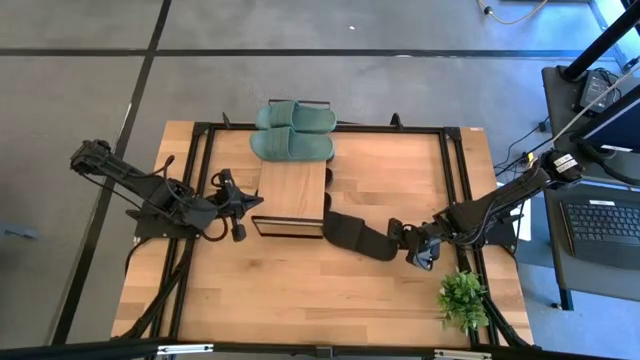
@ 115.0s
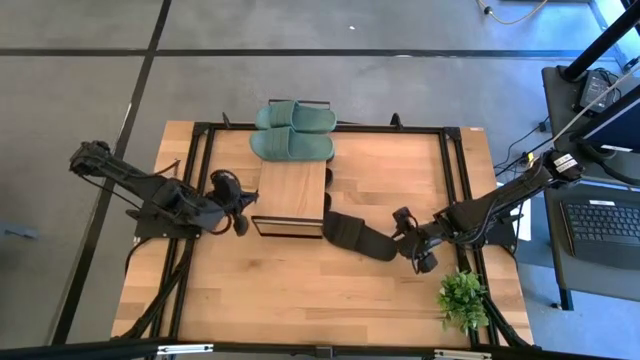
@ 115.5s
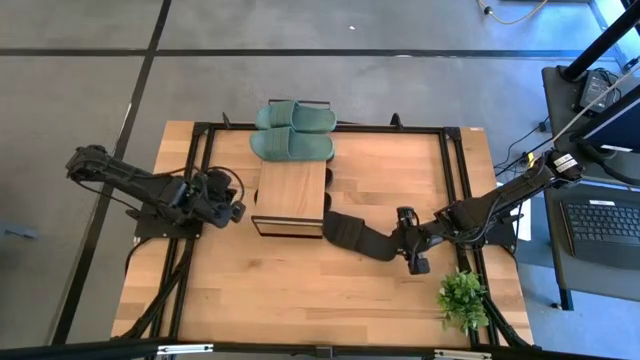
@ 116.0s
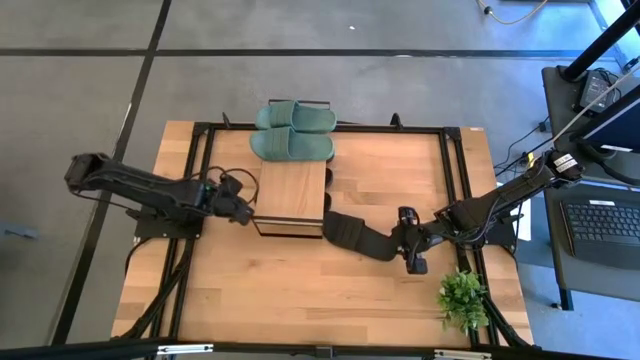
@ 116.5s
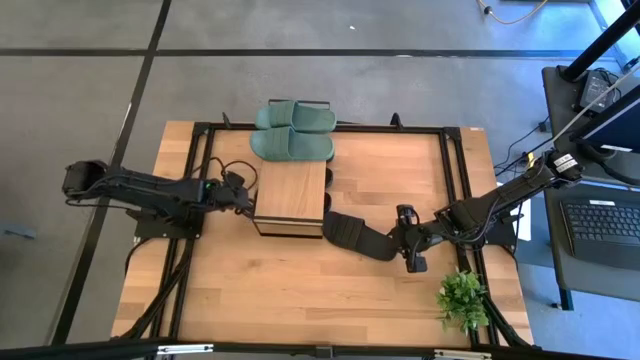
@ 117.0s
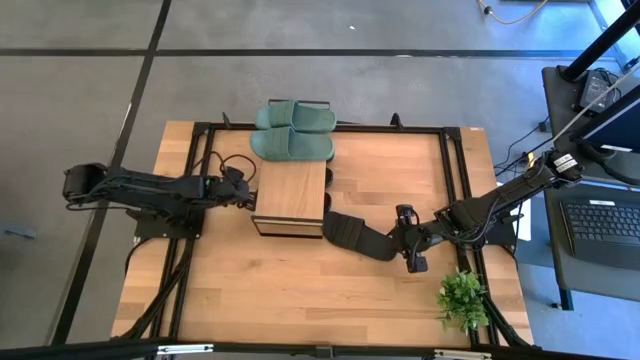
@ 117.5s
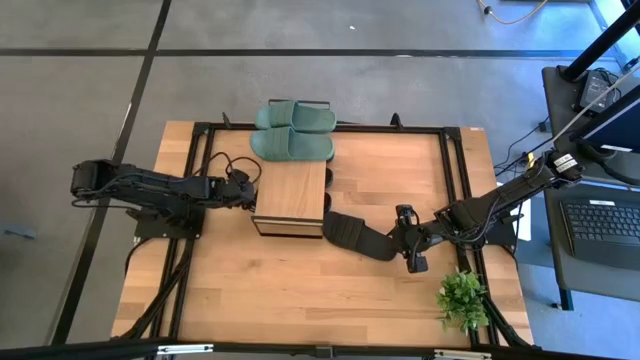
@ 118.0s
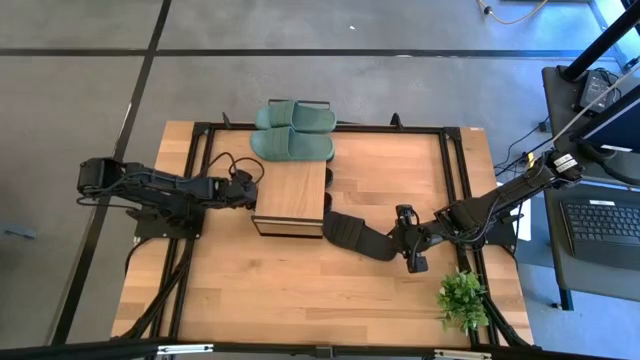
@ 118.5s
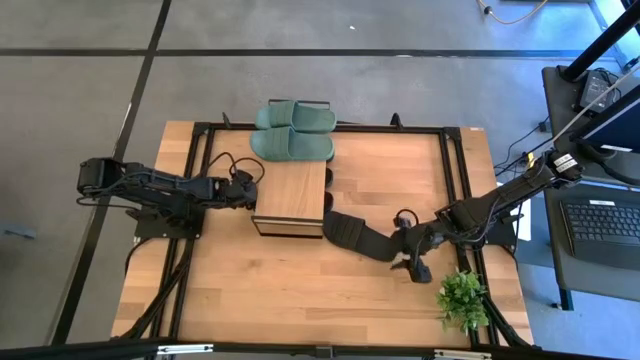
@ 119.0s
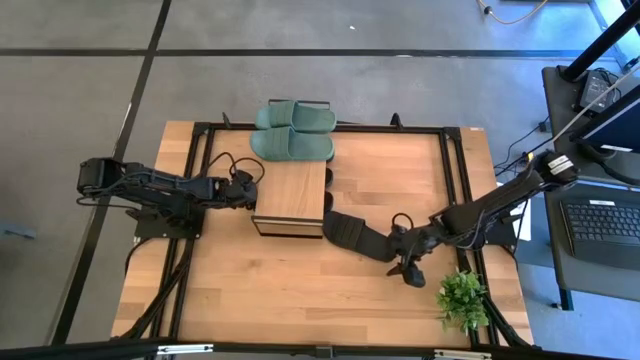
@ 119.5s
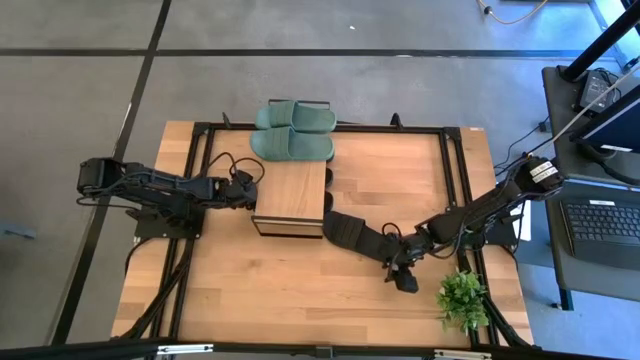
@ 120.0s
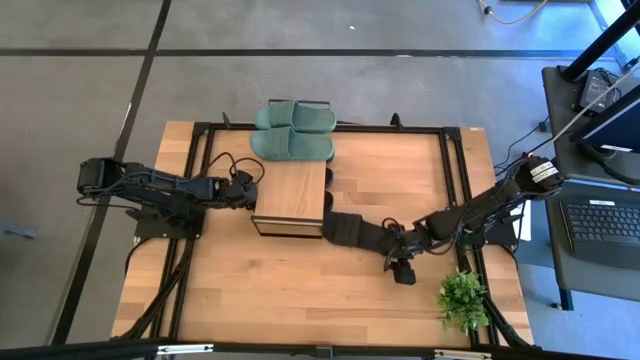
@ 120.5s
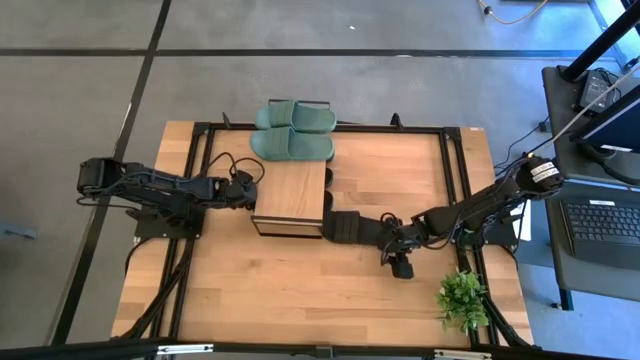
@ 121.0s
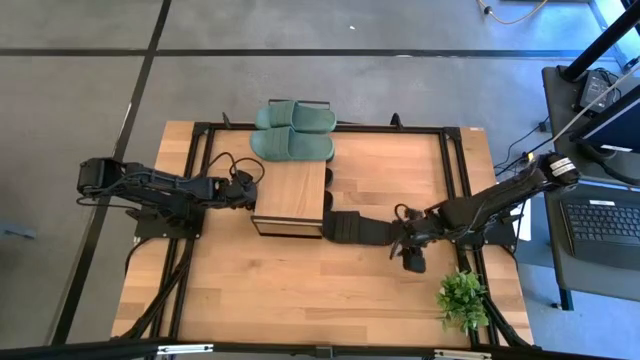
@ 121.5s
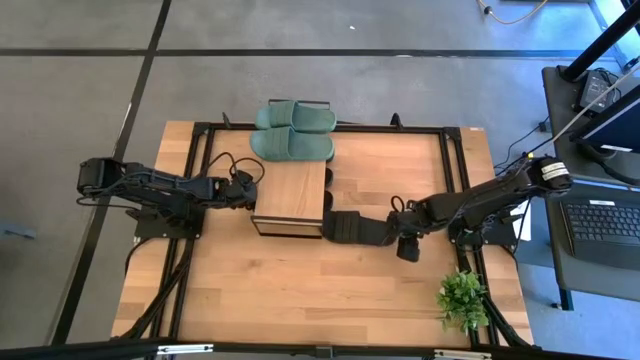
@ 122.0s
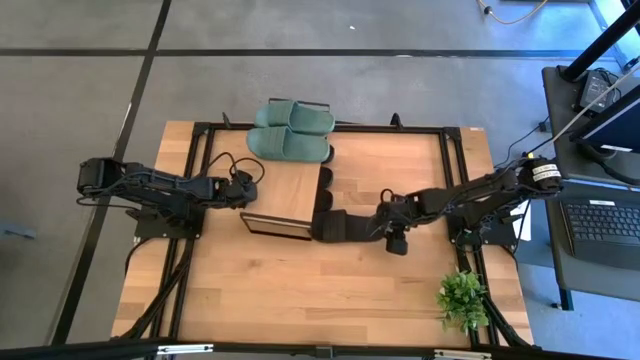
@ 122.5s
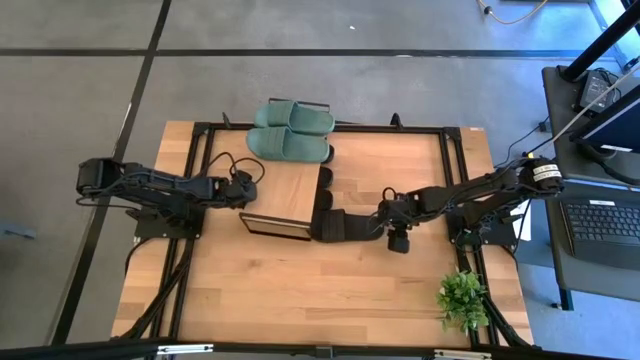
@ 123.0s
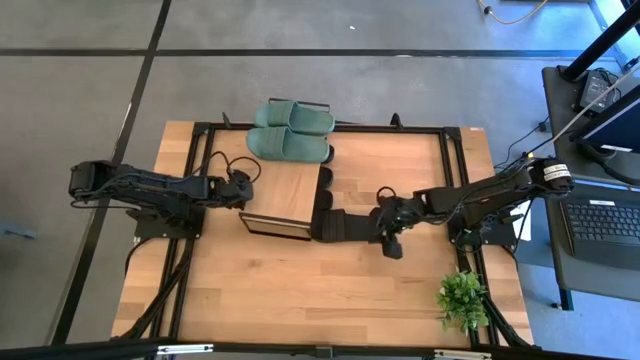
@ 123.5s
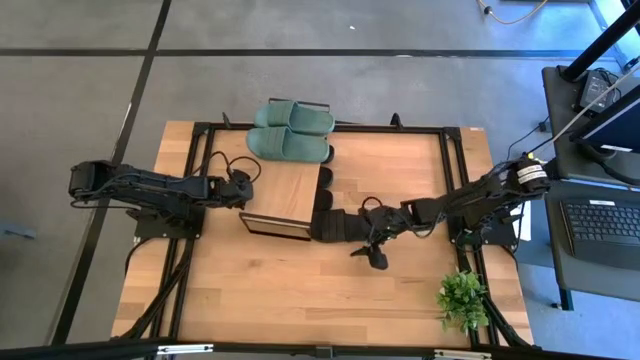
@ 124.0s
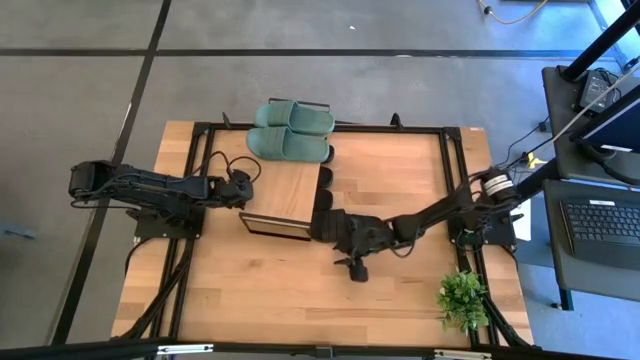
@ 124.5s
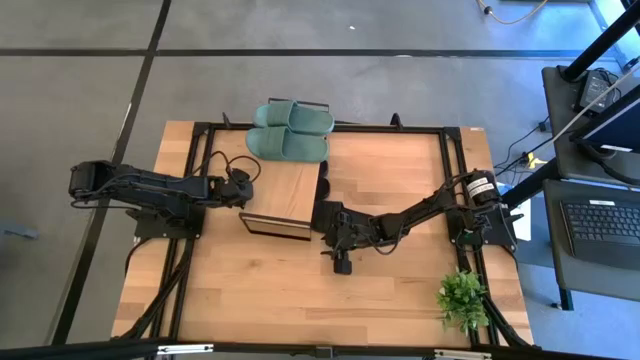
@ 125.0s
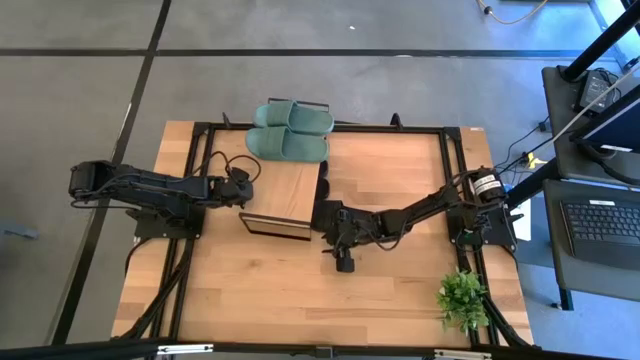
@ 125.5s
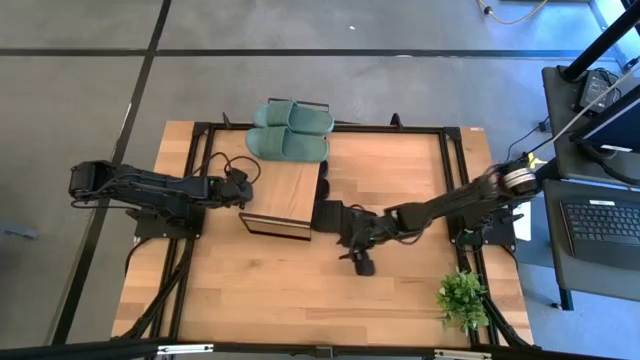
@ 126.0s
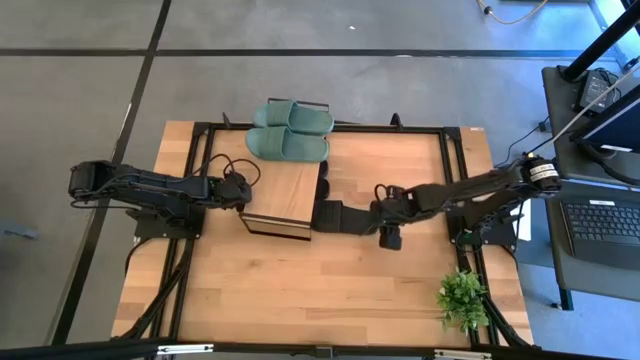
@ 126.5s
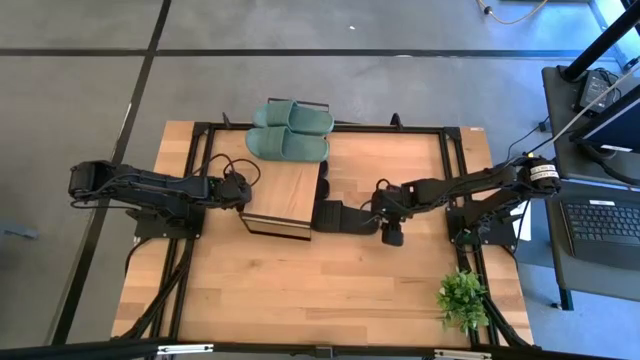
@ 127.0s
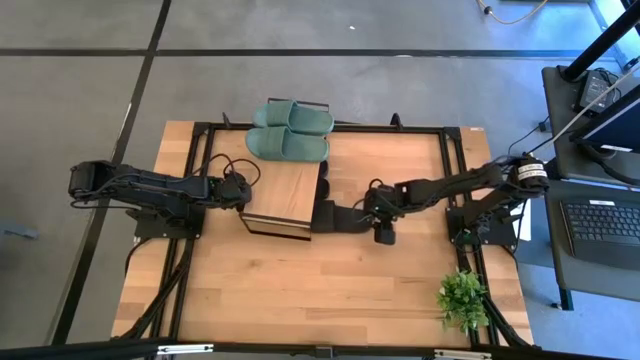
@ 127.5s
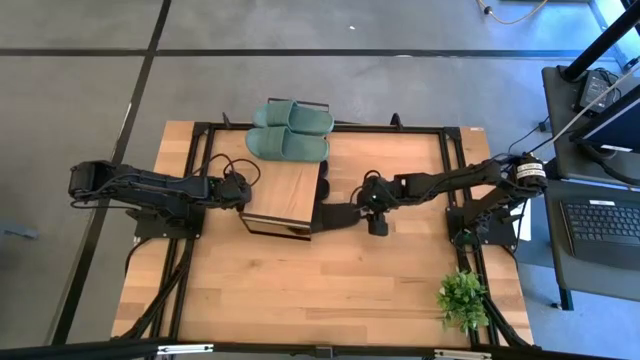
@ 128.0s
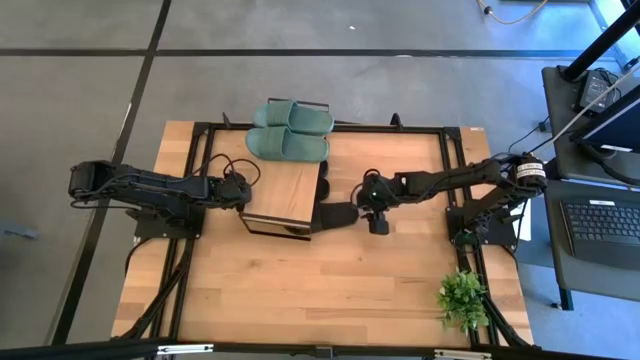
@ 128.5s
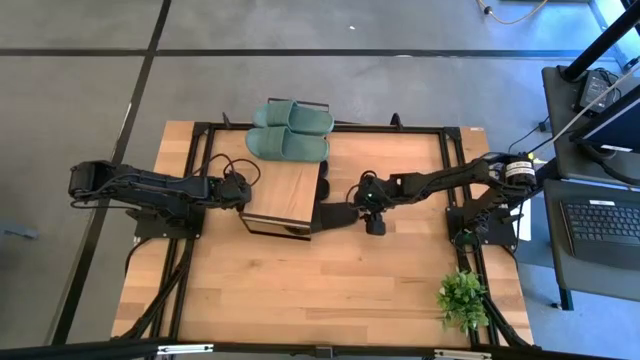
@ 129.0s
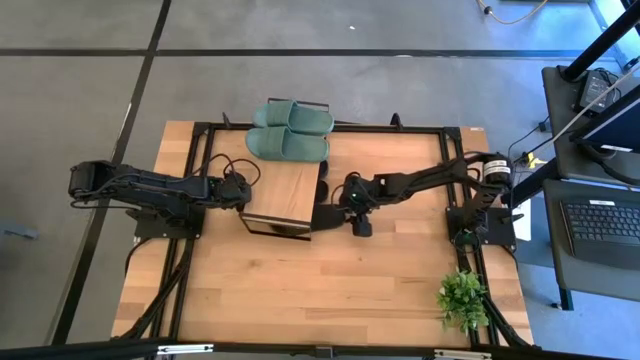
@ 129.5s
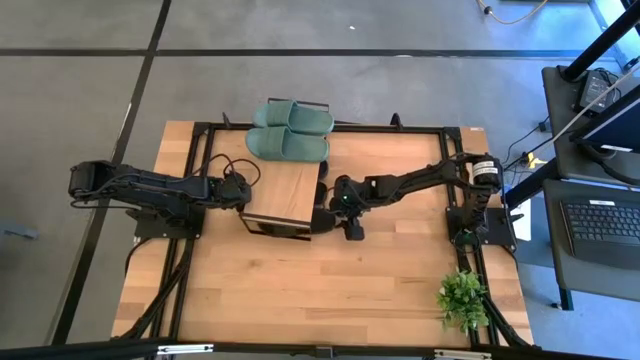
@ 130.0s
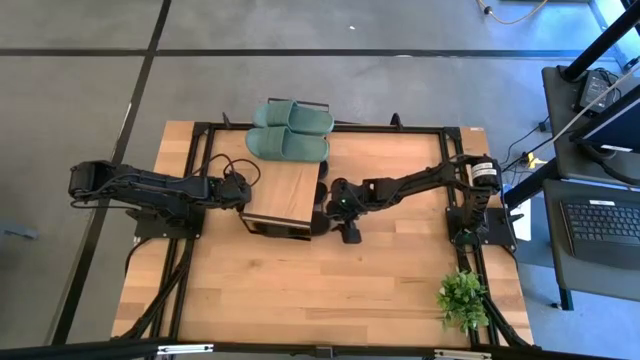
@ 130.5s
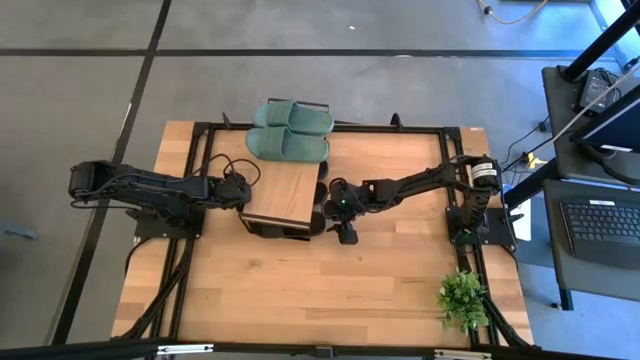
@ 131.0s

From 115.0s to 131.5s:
Task: Pick and place slides into the shelf
Put the black slide under the shelf

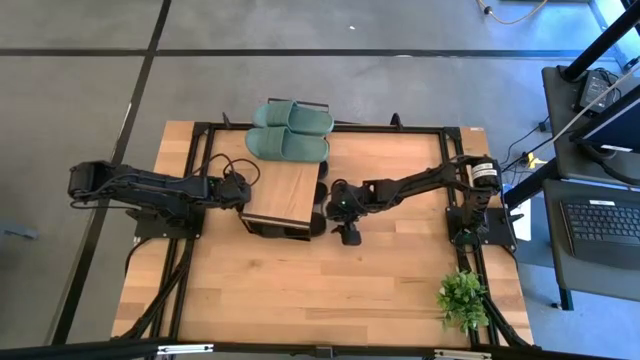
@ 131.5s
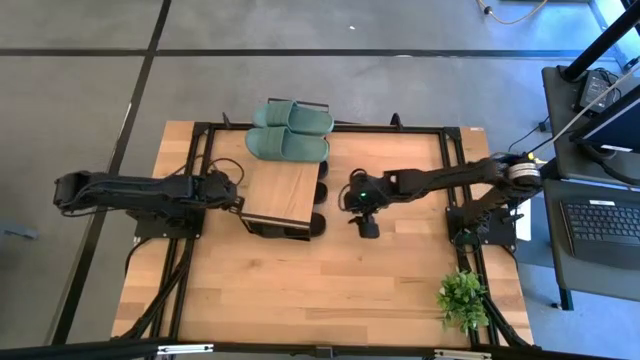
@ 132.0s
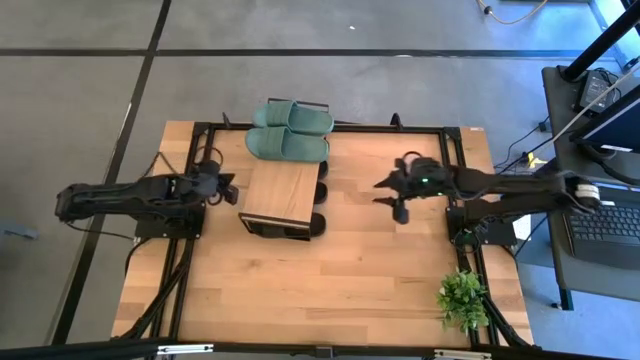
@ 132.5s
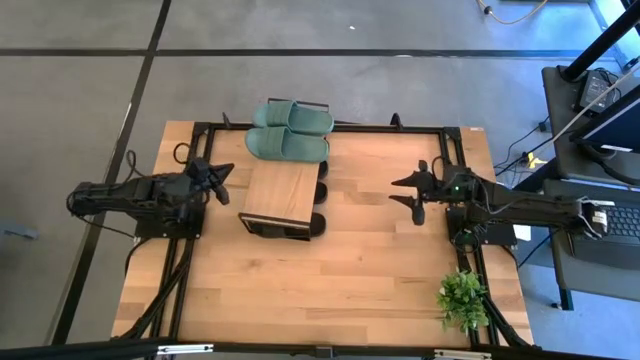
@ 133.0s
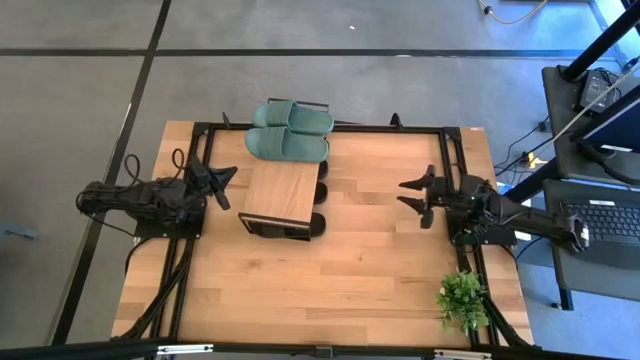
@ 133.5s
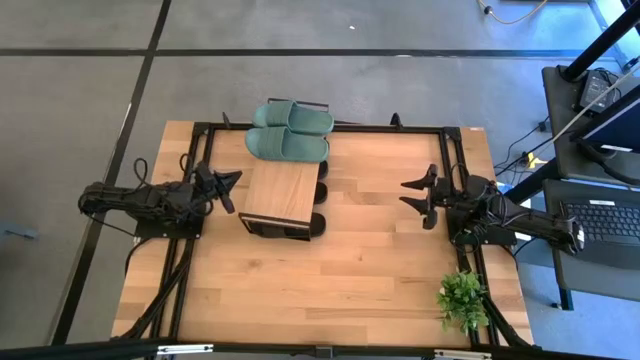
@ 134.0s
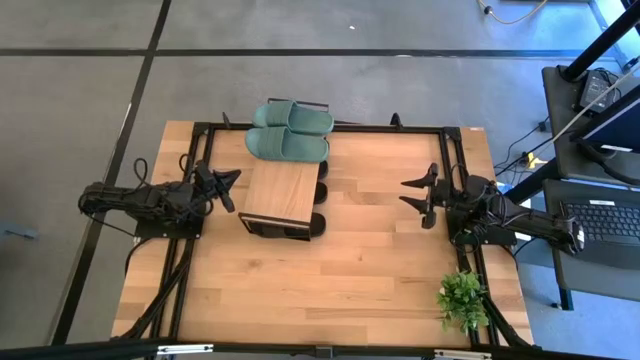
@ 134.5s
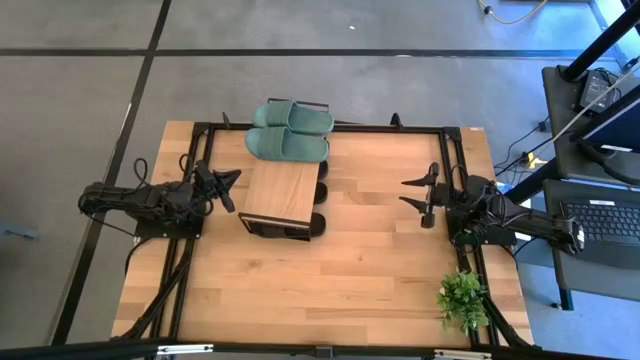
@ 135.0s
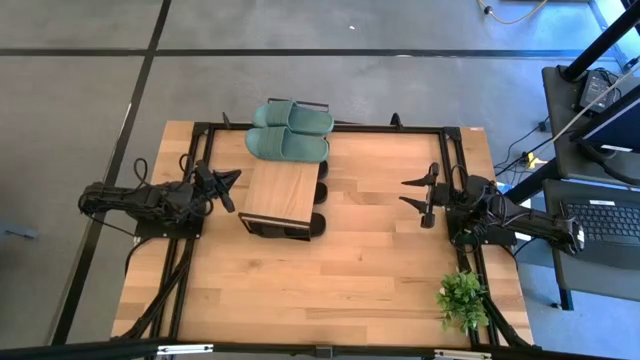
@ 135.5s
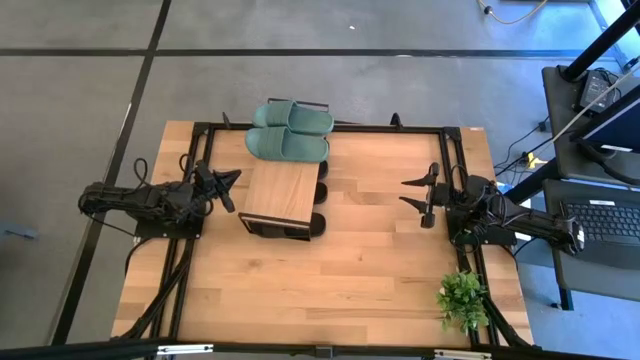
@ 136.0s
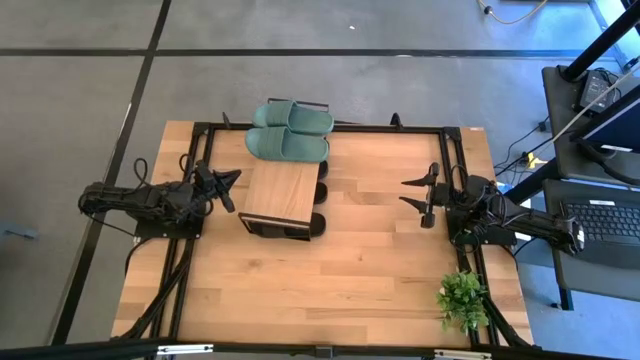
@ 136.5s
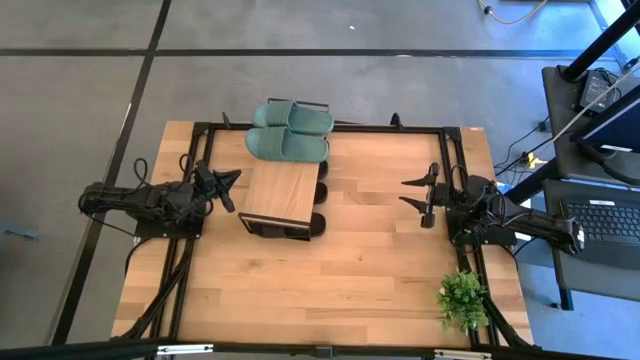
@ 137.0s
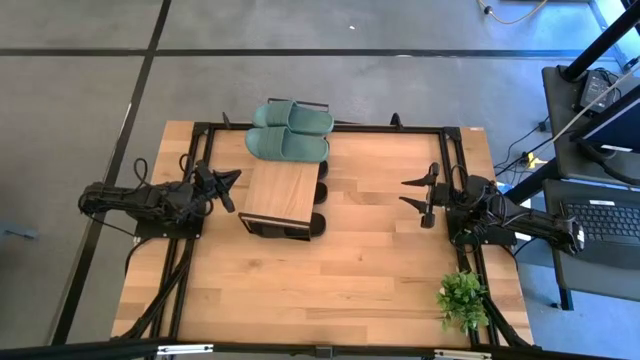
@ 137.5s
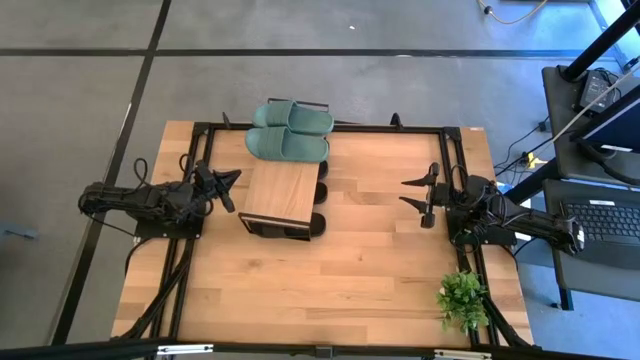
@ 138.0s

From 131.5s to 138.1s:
Return to Home Position
